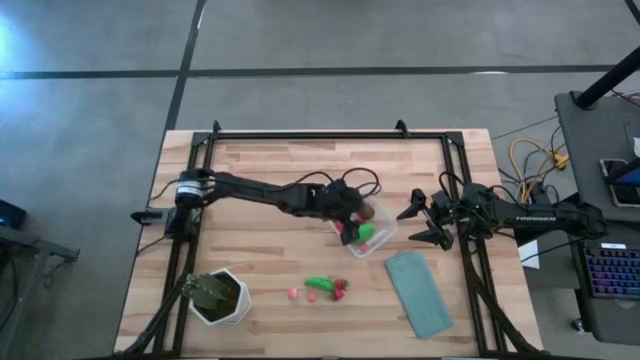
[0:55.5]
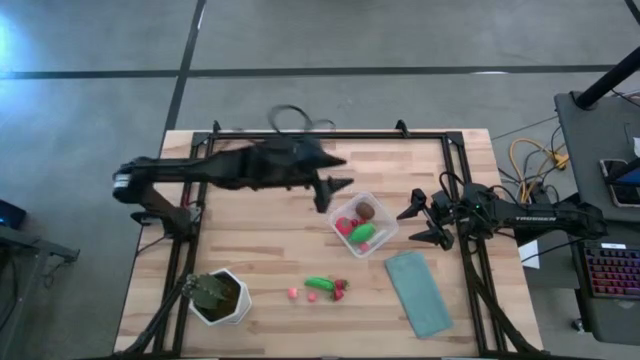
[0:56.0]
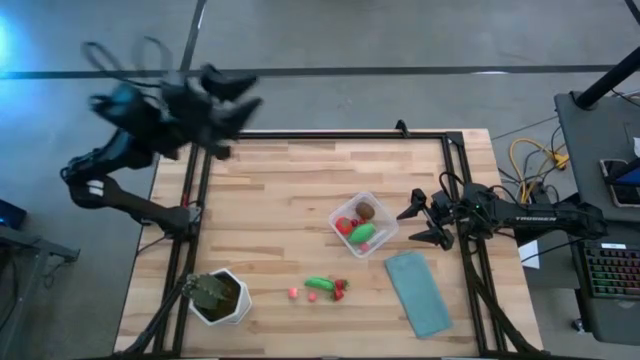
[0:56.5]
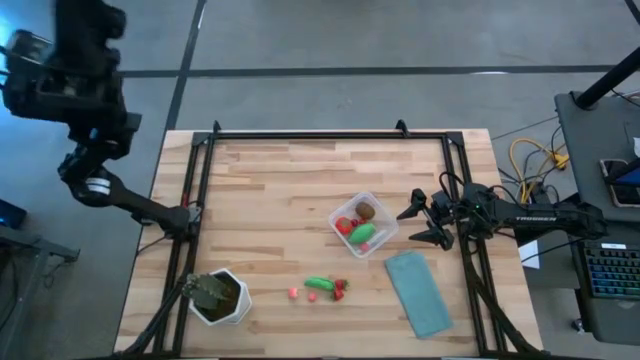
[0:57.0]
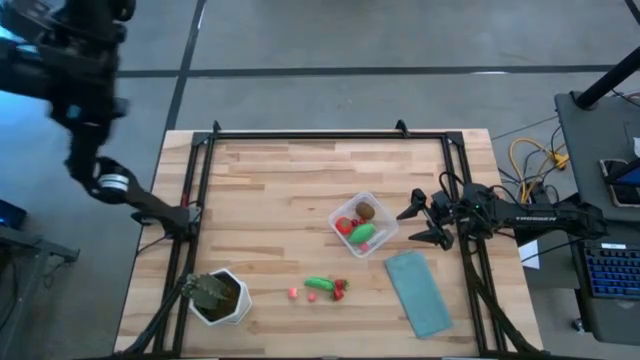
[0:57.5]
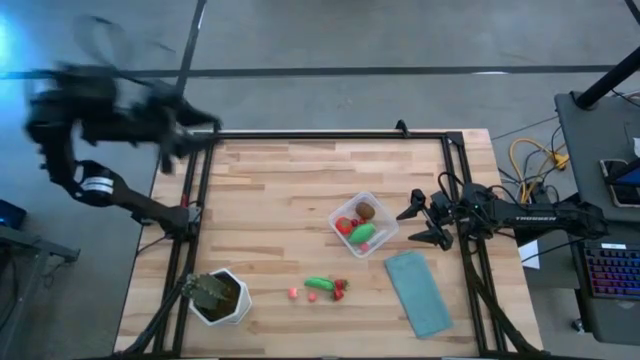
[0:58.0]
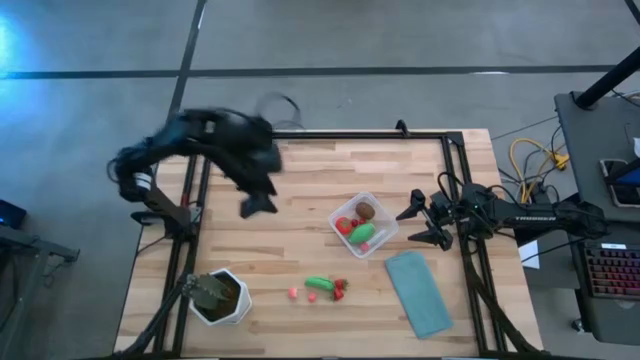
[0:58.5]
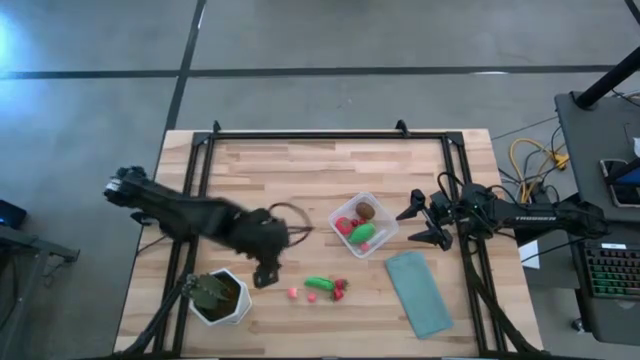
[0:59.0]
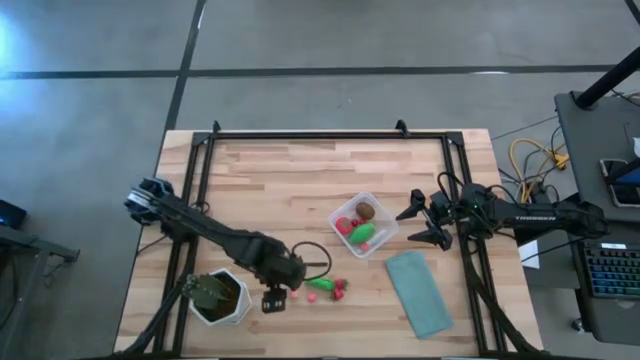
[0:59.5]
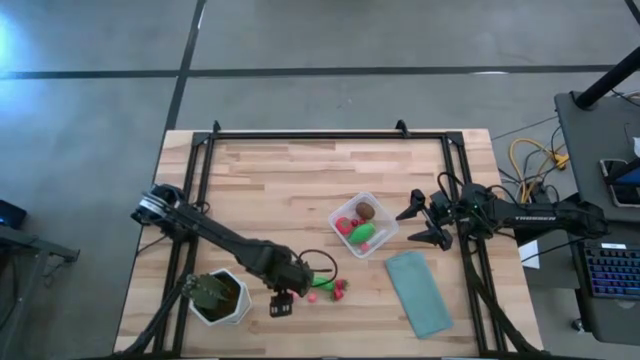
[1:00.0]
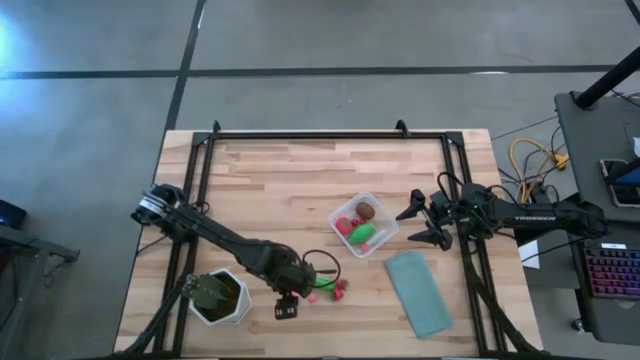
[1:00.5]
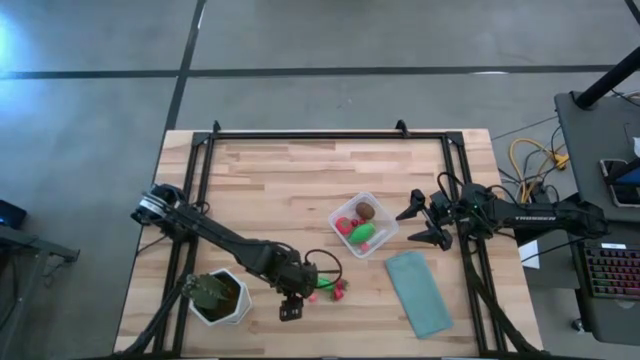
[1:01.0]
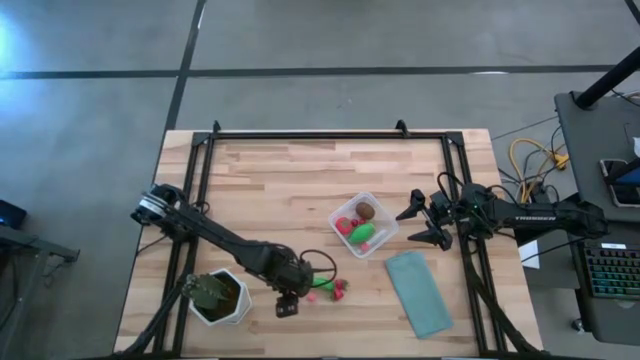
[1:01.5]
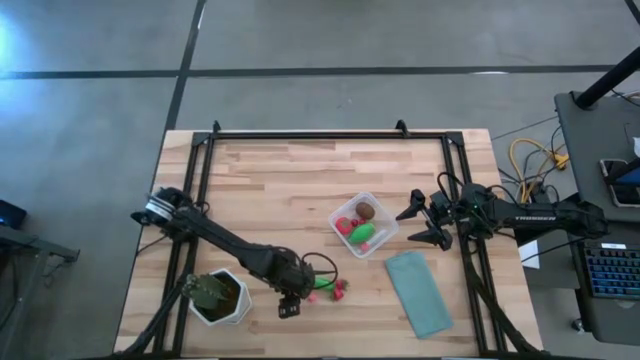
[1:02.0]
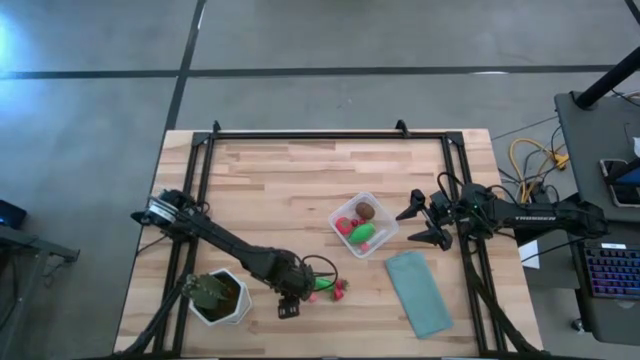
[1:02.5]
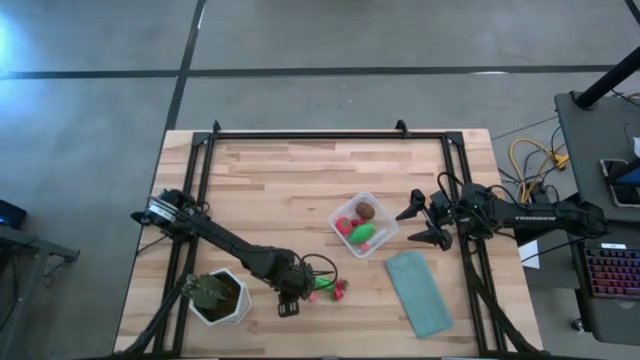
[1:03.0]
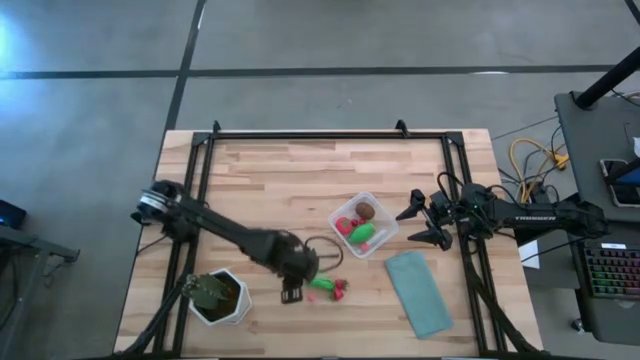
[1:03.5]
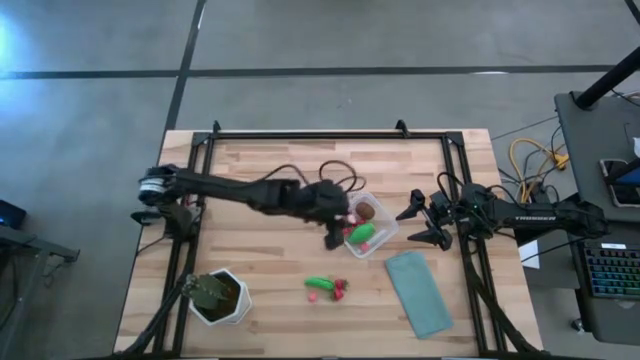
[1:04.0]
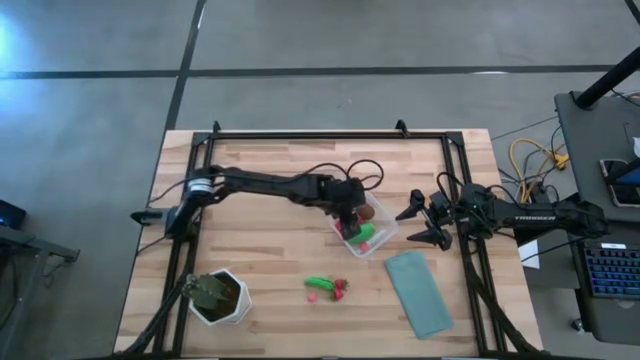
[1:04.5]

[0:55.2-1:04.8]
Task: Pick and placing Produce into tupperware
Put the left pink peach into the transparent bin

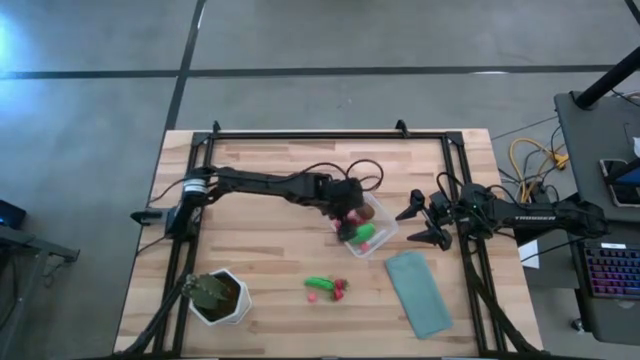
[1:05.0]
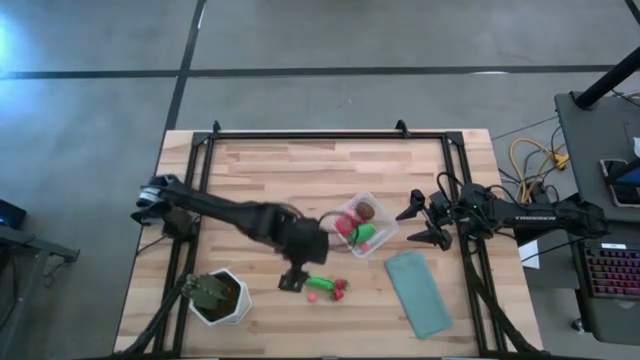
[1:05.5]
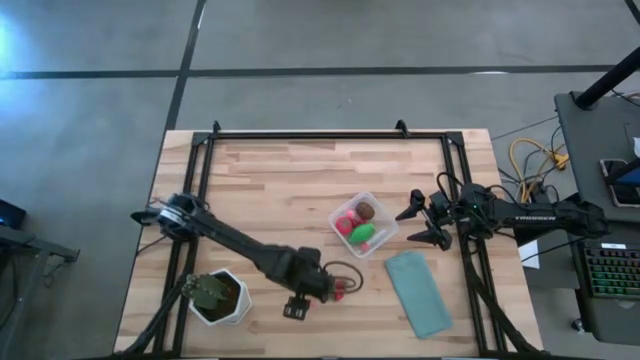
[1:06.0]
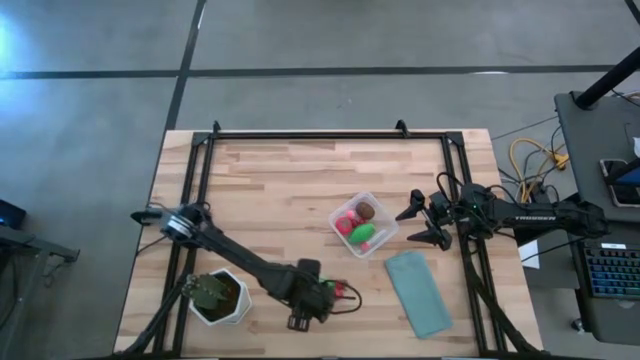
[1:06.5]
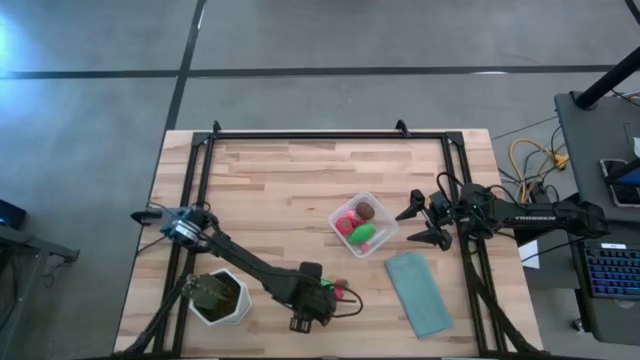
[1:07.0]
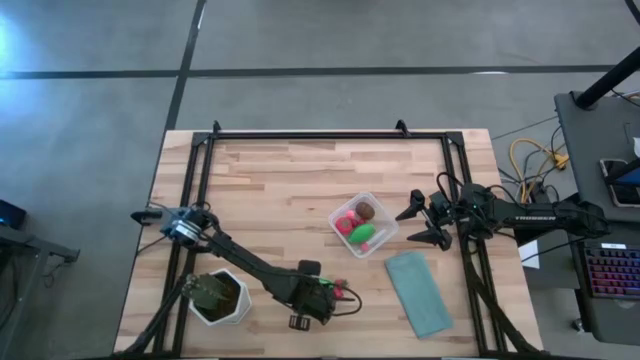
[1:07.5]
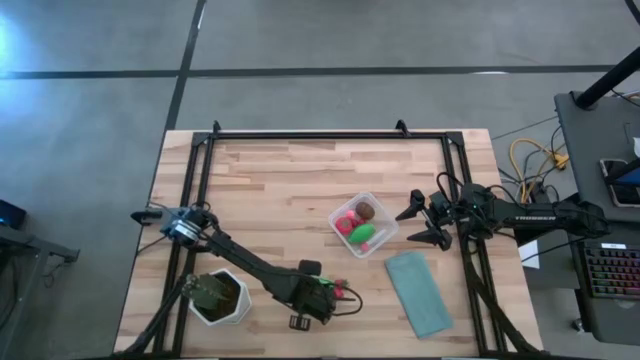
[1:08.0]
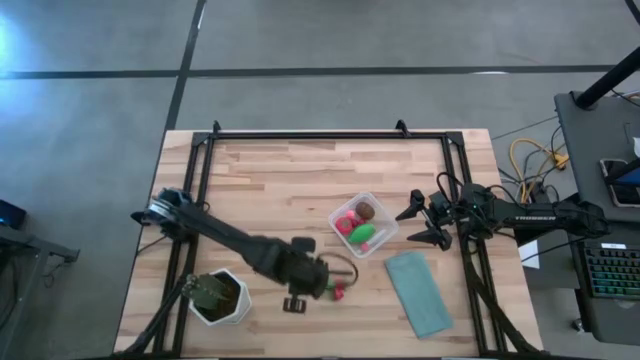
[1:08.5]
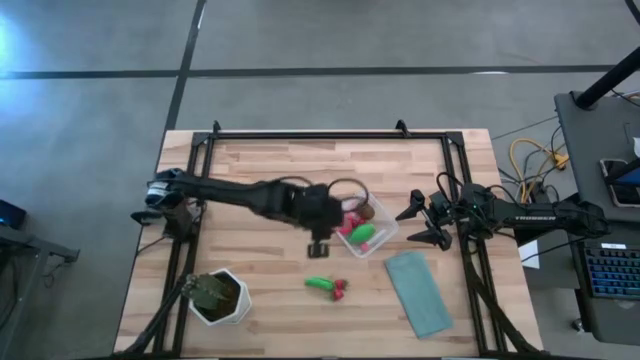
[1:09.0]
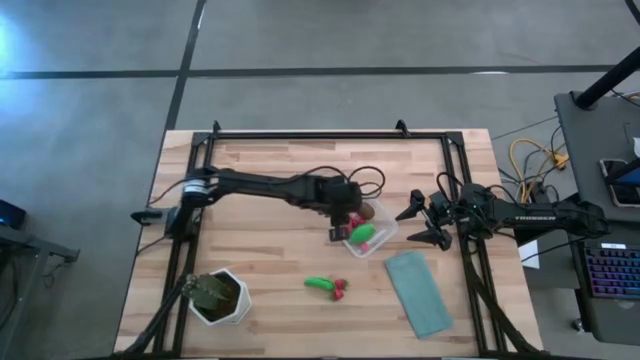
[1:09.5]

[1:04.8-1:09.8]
Put the pink peach into the transparent bin

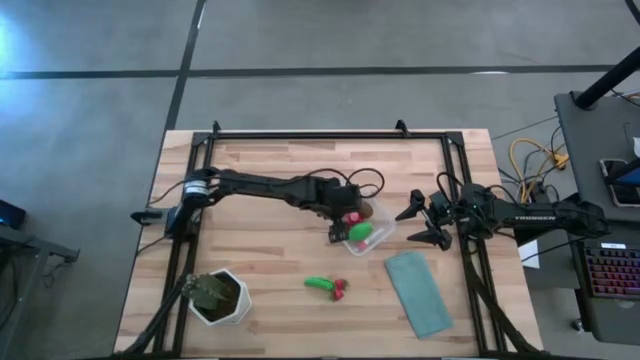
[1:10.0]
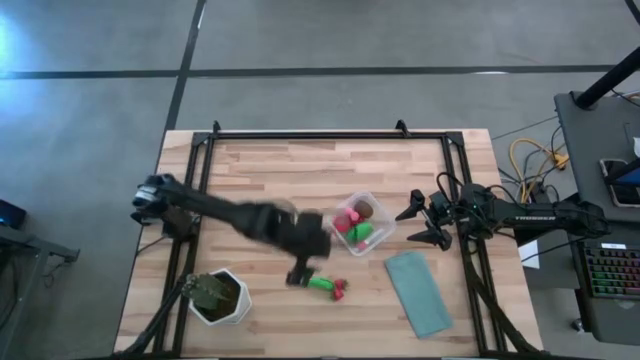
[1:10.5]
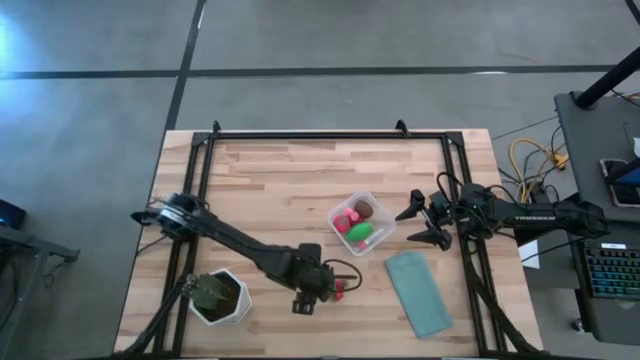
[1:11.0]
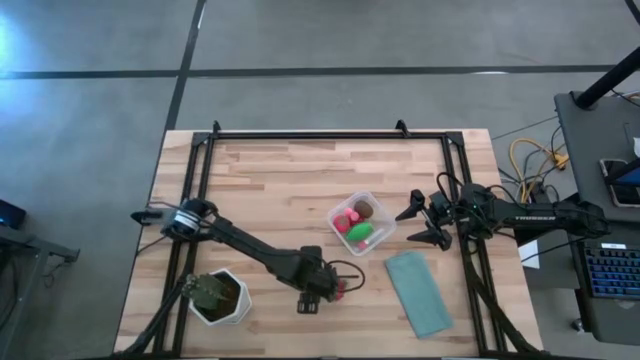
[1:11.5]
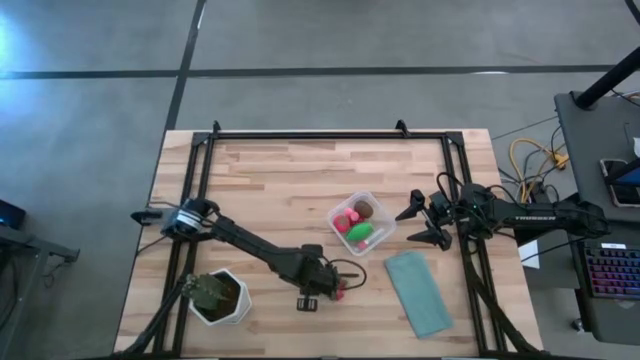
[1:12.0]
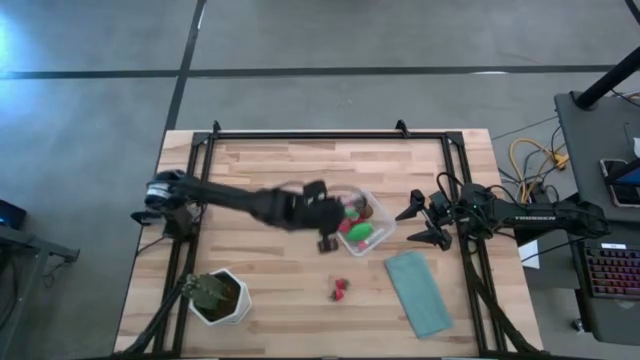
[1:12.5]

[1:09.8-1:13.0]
Put the green peas into the transparent bin

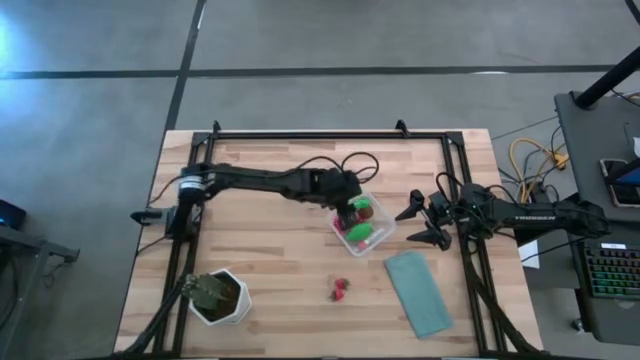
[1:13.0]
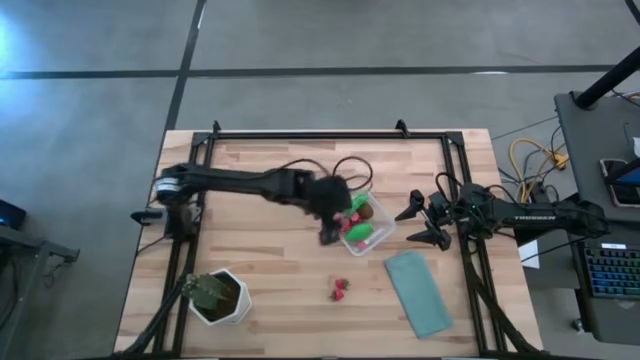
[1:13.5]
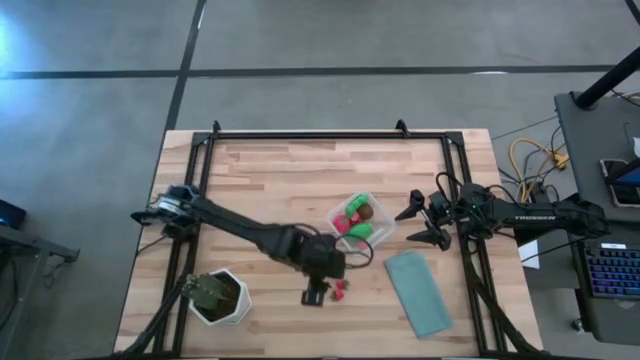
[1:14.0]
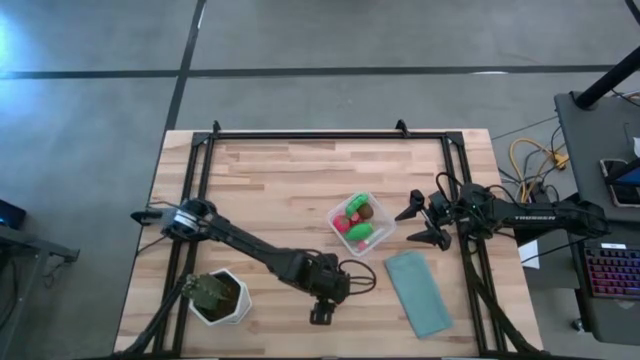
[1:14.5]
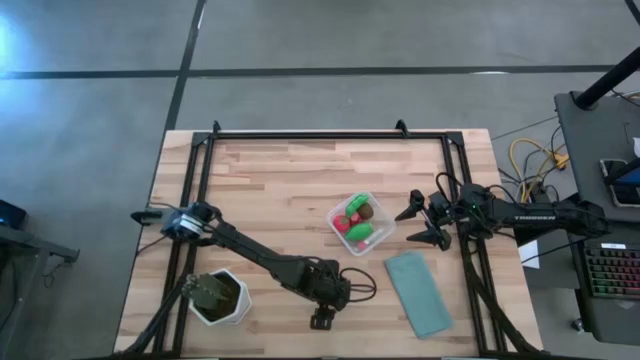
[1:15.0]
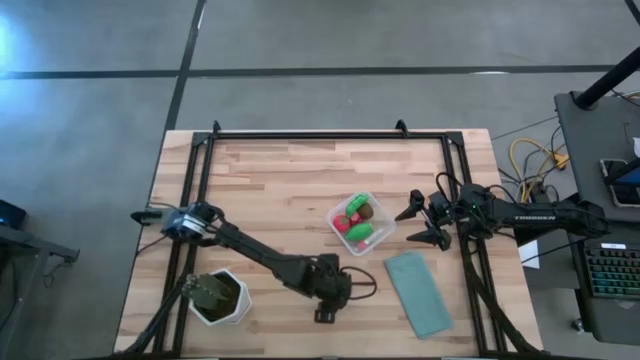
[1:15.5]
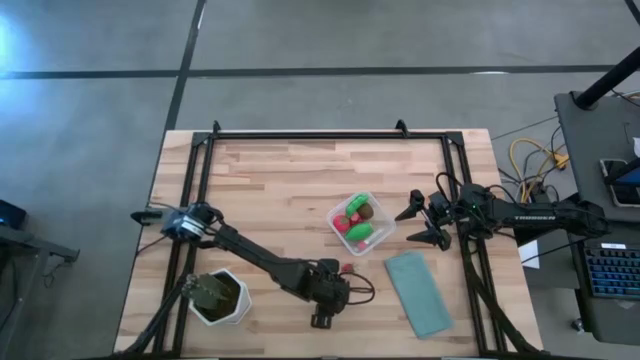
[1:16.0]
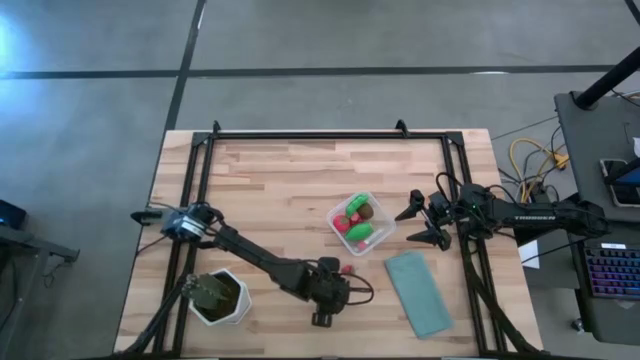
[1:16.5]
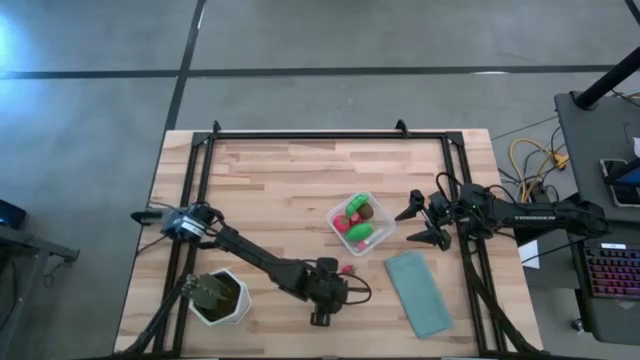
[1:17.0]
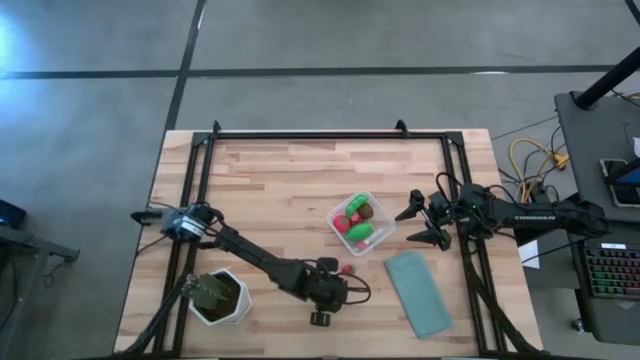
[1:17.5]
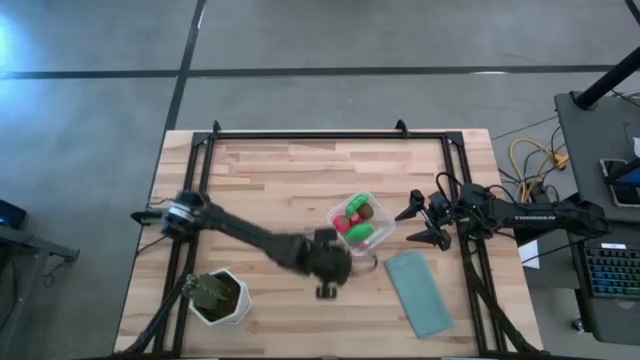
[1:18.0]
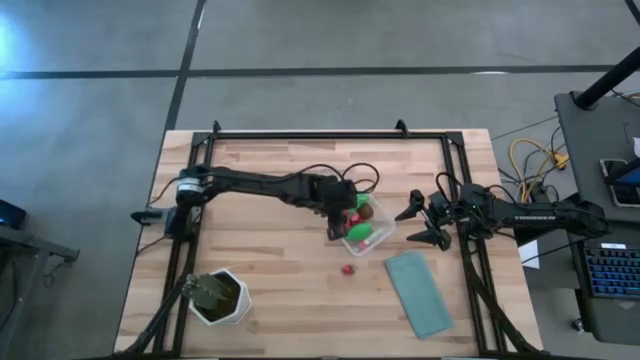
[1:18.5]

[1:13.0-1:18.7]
Put the bottom red strawberry into the transparent bin
